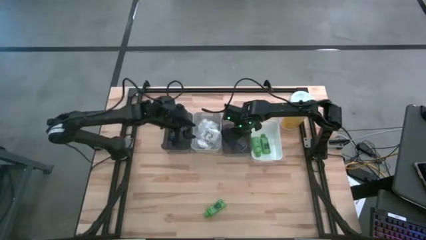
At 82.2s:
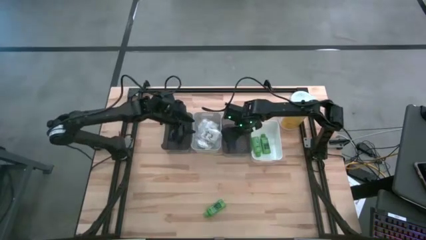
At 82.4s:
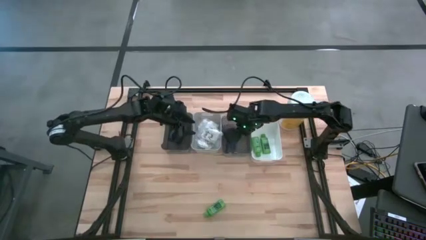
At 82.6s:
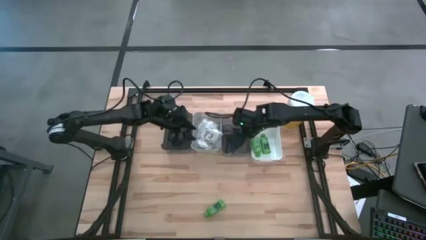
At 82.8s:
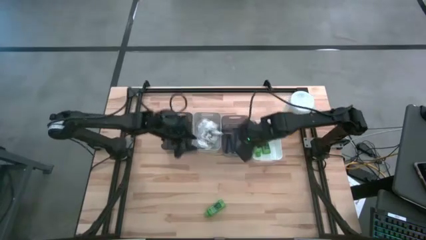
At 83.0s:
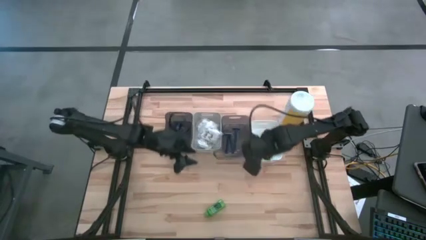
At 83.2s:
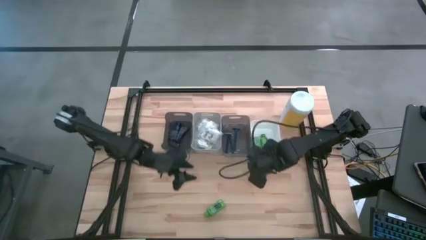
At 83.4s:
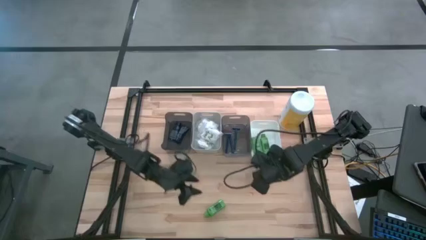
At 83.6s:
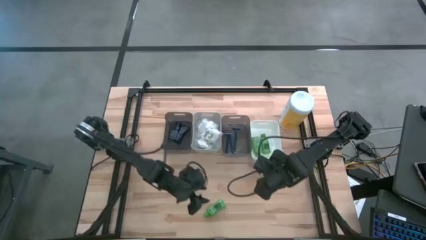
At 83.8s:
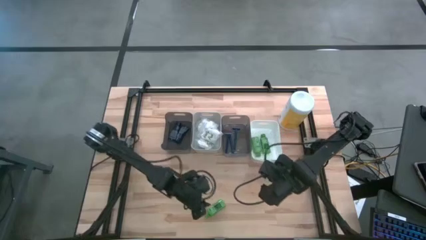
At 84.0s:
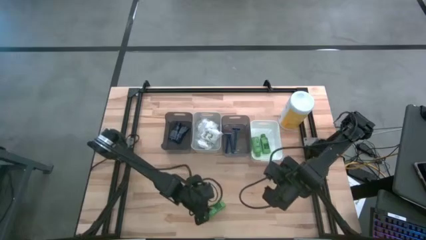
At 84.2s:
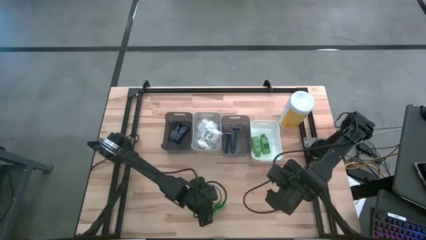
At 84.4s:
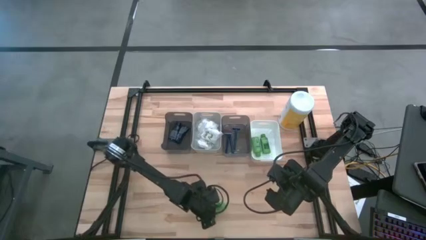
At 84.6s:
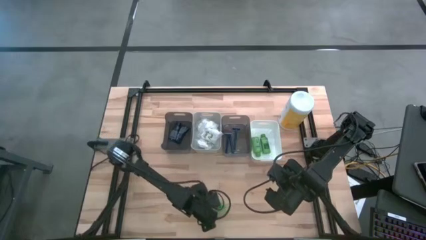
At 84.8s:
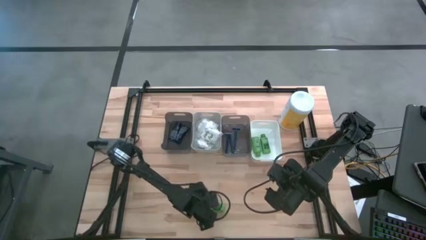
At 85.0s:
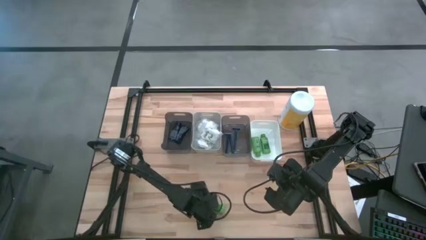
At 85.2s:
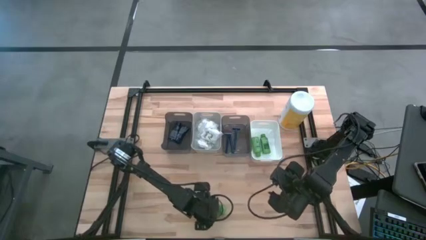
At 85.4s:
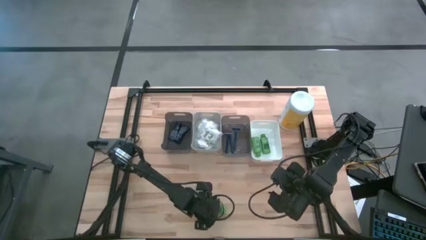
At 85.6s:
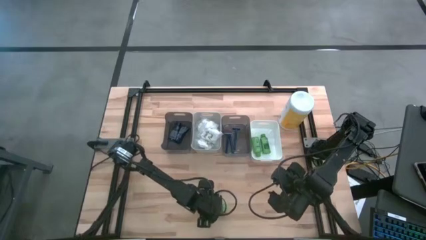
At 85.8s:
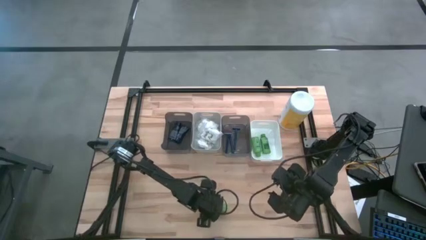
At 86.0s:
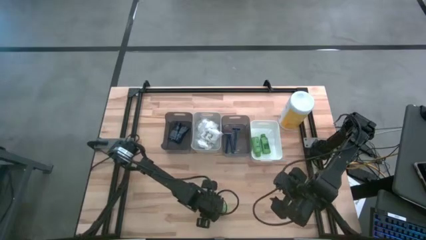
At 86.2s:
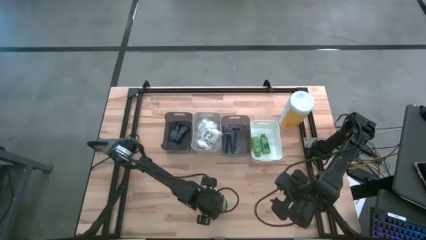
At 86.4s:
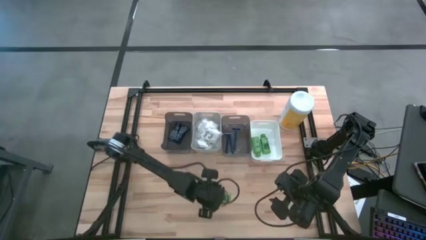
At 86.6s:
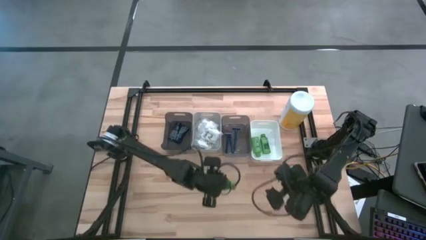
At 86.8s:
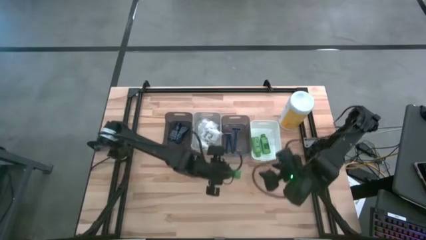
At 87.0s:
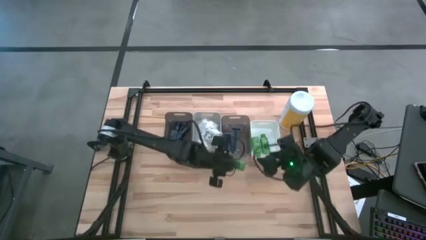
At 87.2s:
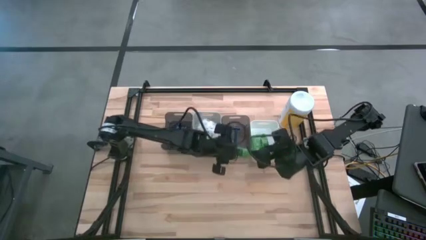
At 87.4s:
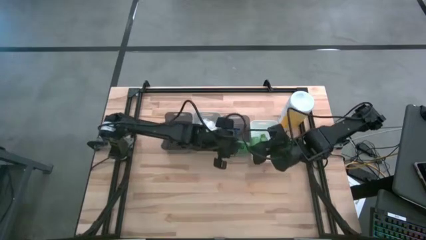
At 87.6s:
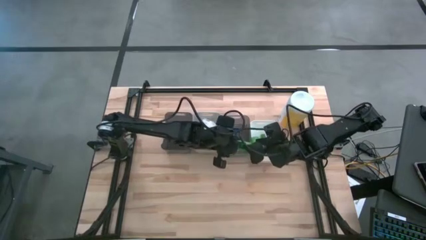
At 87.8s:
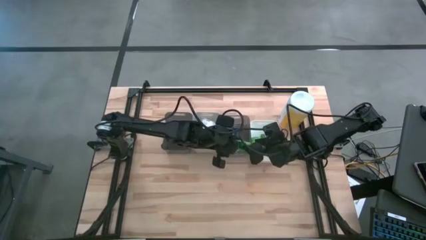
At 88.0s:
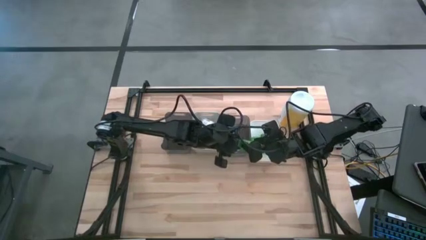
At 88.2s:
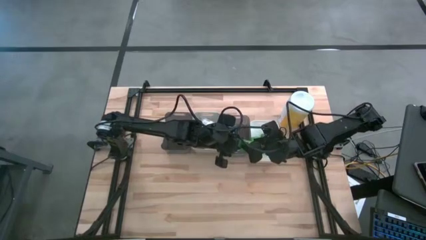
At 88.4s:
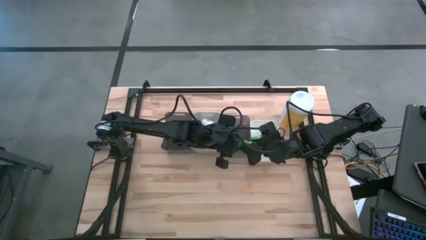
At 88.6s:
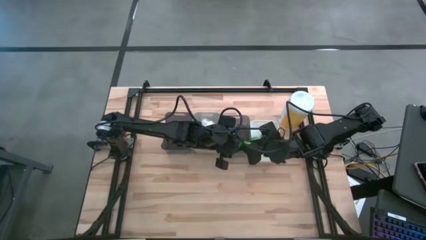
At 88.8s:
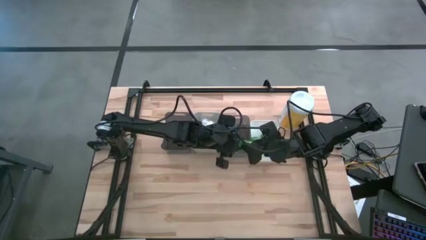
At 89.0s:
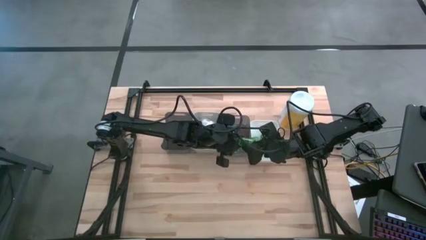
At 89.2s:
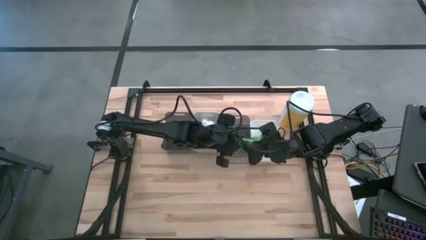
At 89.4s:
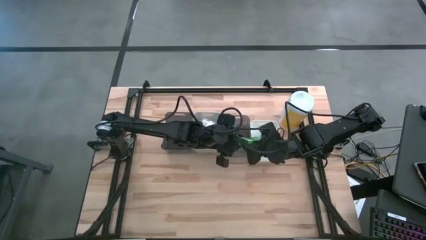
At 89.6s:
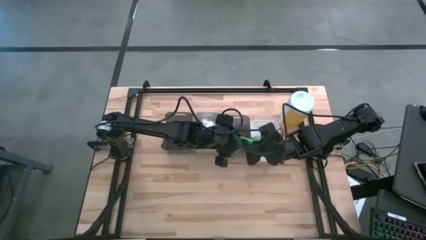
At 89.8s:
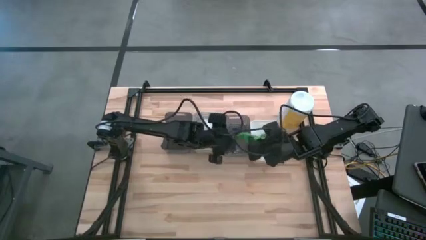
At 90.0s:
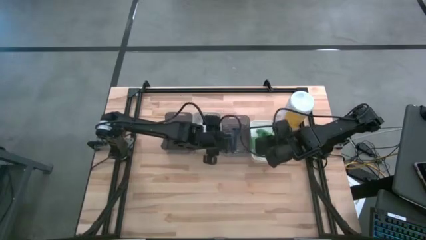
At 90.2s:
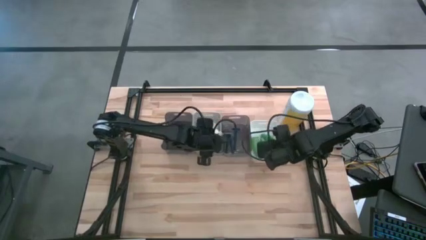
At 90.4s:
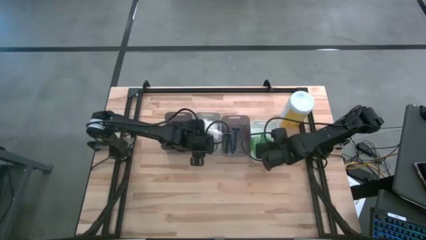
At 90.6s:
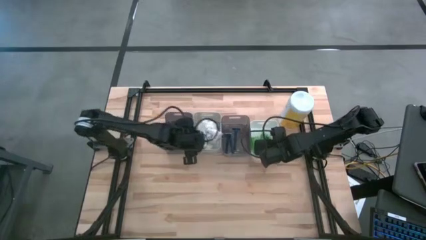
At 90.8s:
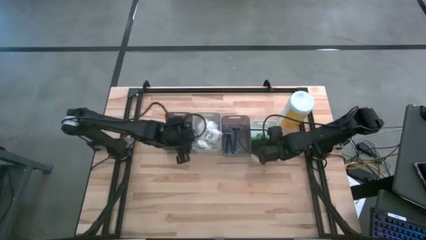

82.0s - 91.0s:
Task: Pick & Place Travel size toiletries
Put the green shampoo into the white bin

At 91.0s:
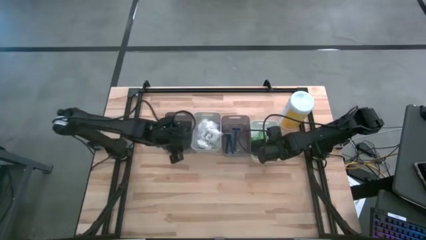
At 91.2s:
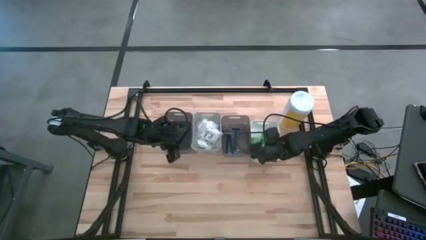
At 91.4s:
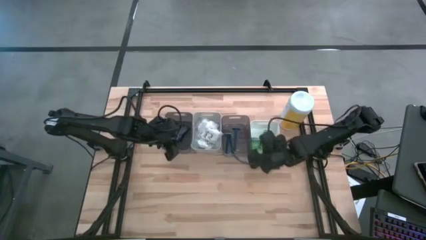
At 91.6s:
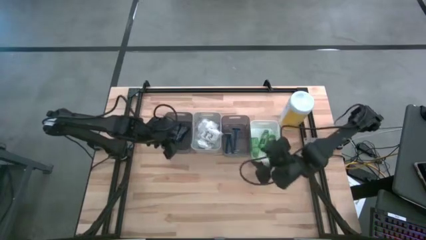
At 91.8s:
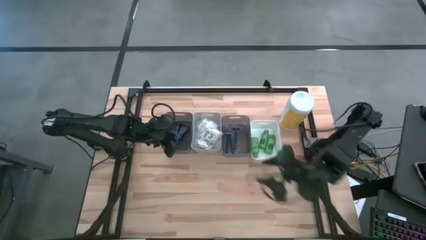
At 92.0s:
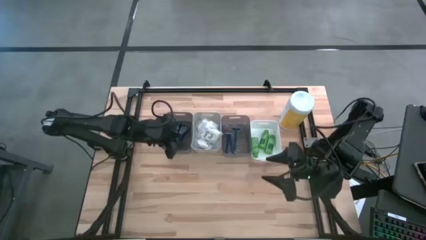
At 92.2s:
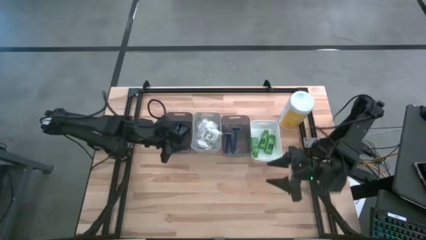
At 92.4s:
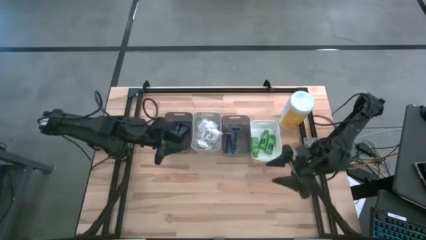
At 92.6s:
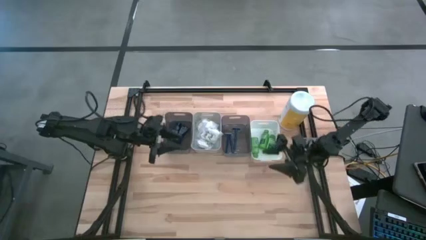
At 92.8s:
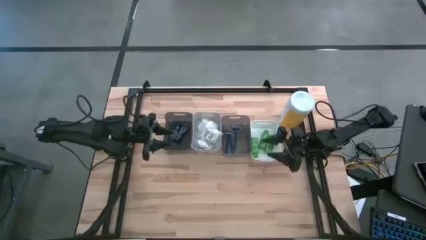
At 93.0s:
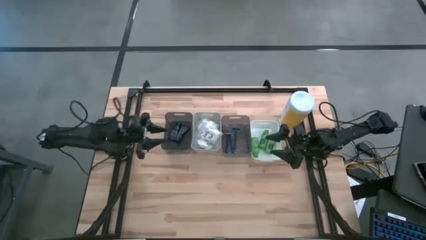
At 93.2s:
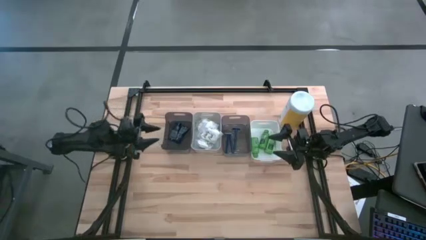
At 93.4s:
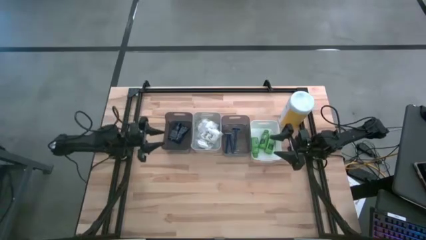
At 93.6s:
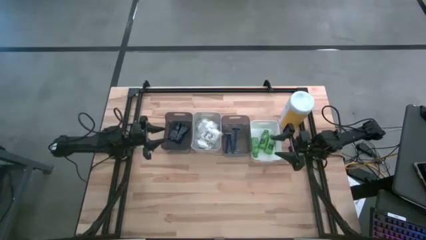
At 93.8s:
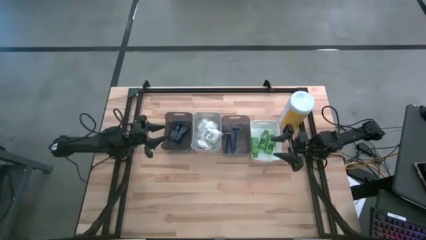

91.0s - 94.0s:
Return to Home Position

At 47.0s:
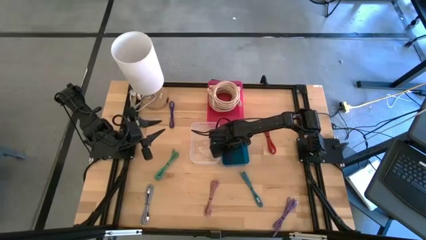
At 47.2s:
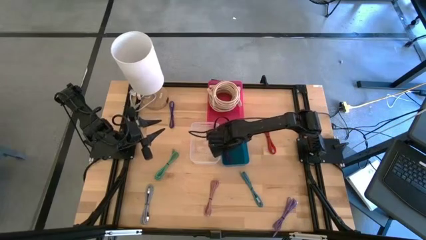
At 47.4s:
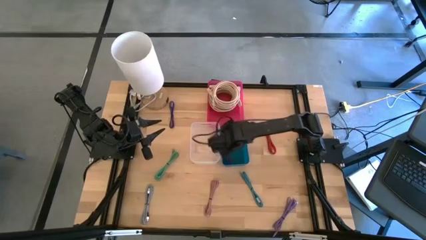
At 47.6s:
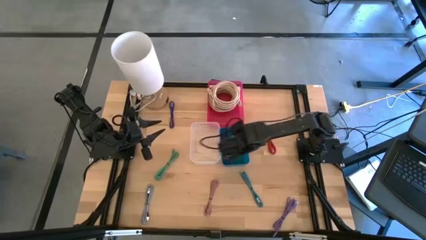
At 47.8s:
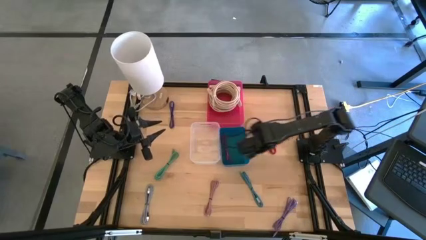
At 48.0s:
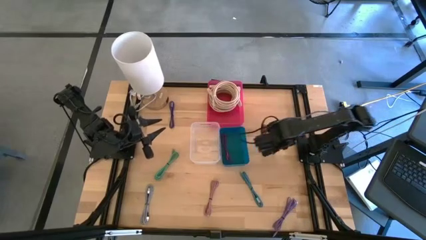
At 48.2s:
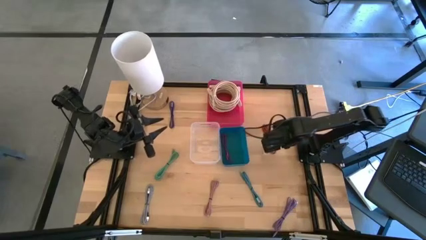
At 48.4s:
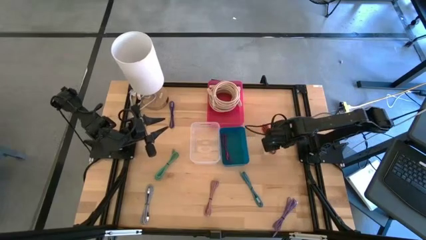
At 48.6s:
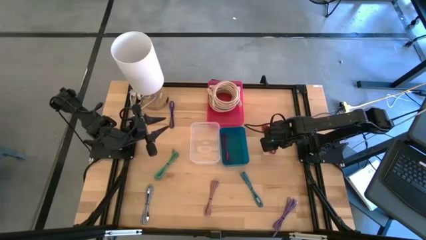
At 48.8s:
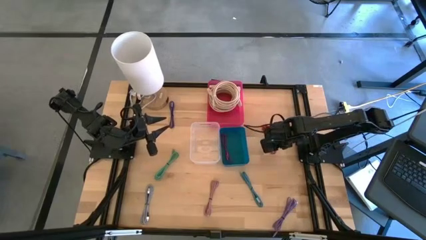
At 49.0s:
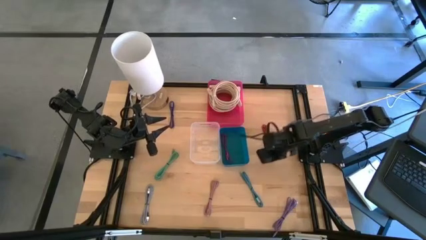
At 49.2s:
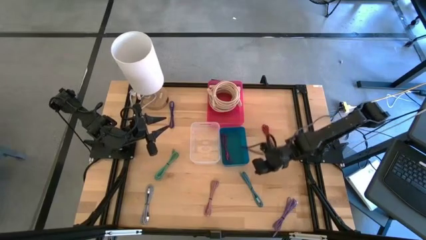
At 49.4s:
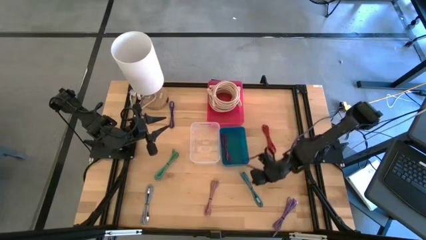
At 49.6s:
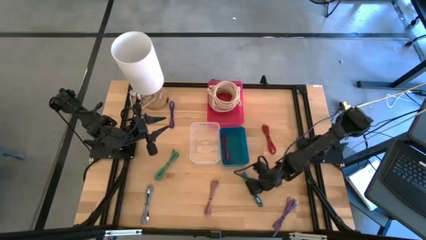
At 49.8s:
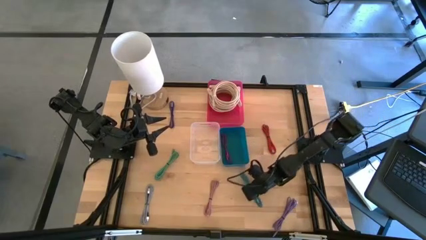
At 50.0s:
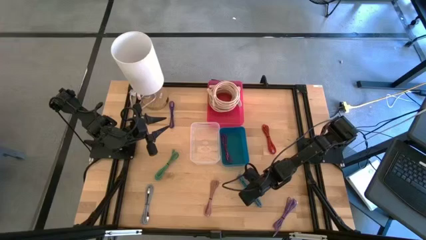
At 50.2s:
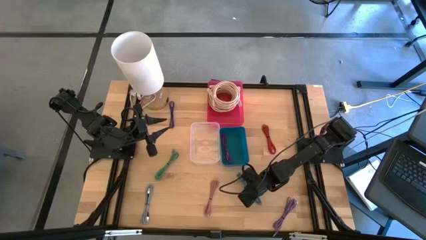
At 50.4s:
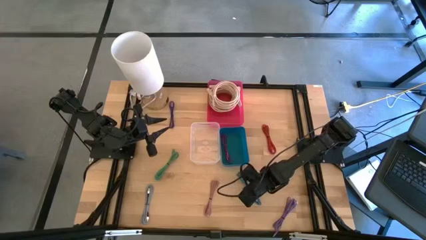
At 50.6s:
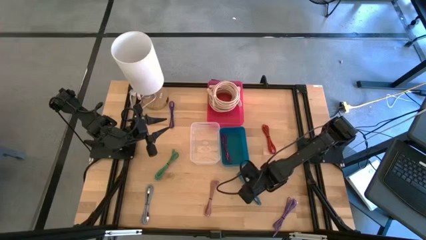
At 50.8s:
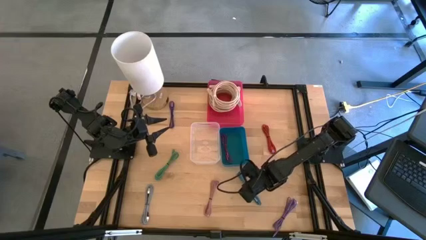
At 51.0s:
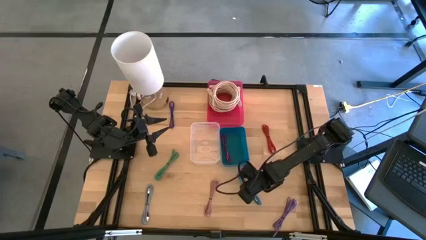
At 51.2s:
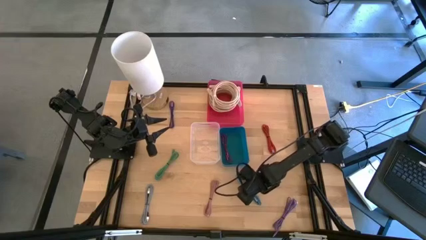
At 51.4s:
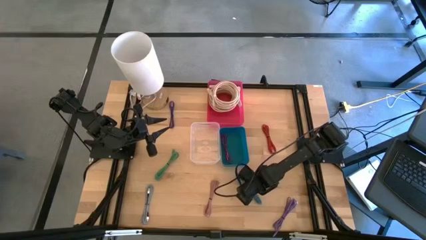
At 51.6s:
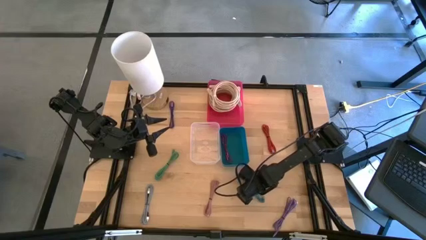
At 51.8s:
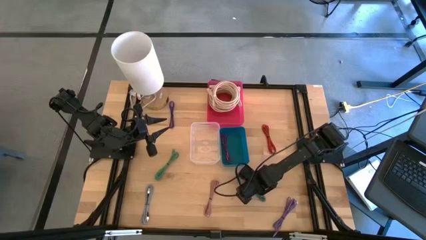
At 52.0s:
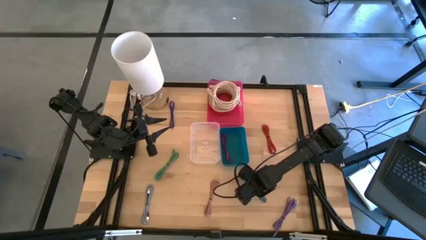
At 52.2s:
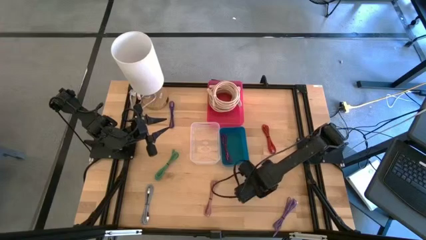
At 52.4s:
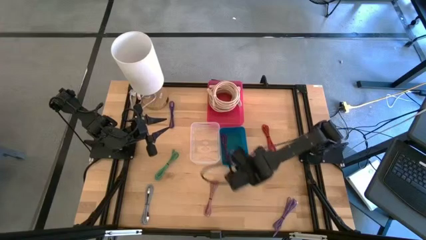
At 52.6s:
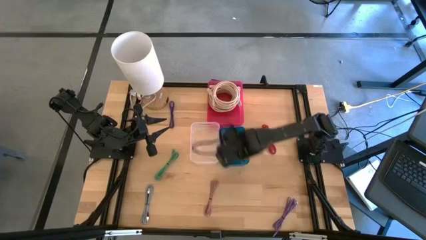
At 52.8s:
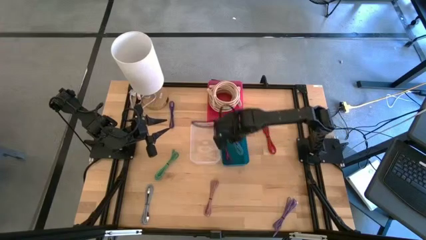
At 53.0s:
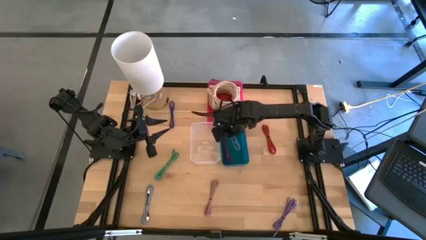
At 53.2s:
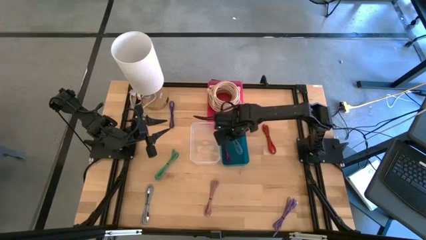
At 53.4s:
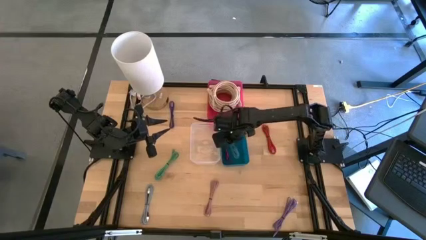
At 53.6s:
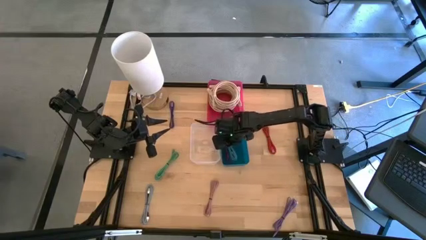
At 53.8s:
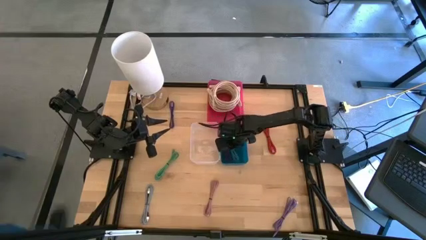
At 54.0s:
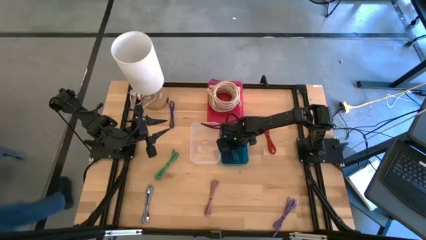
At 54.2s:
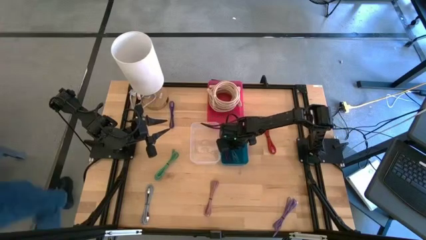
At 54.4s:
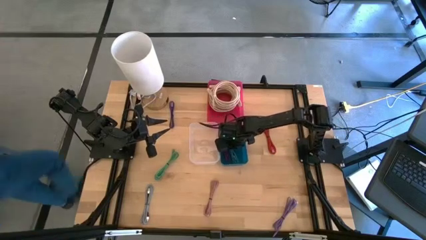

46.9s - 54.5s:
Task: Pick & Place USB Port
Put the blue patterned charger cable into the blue bin
